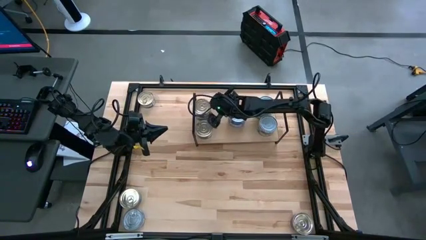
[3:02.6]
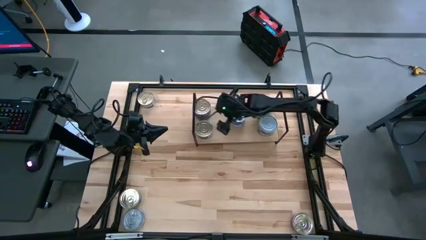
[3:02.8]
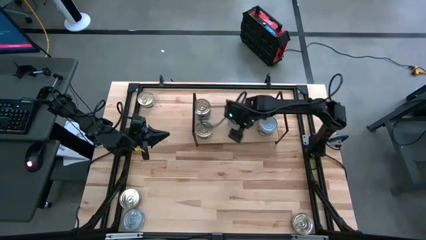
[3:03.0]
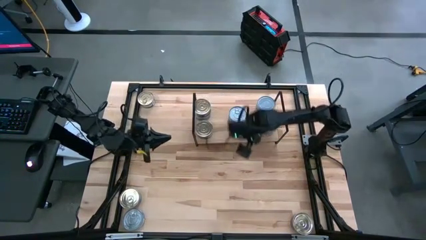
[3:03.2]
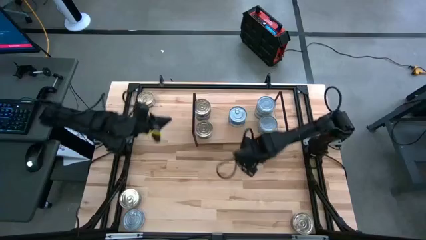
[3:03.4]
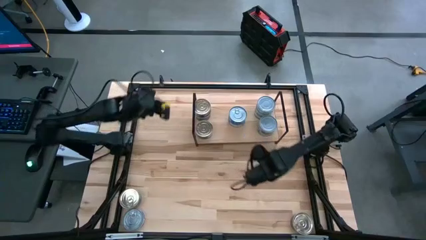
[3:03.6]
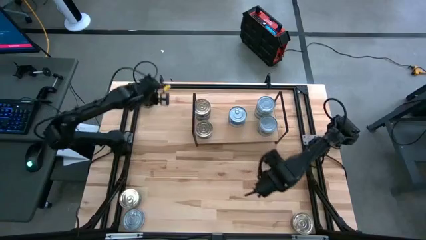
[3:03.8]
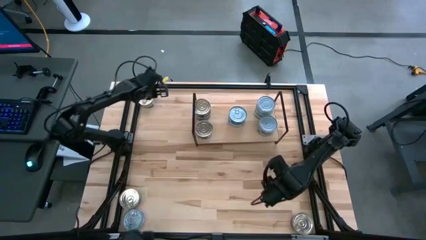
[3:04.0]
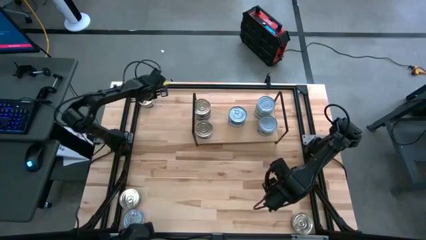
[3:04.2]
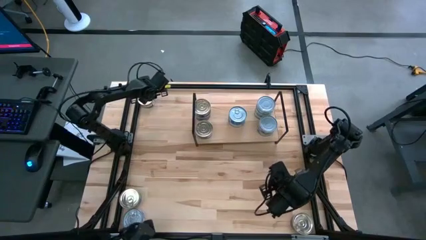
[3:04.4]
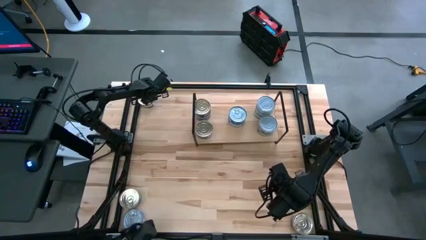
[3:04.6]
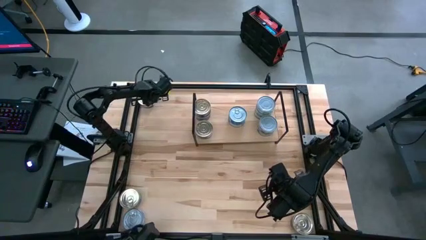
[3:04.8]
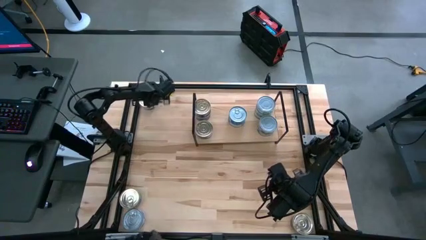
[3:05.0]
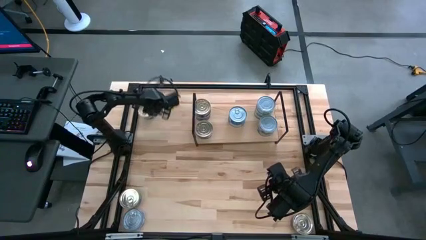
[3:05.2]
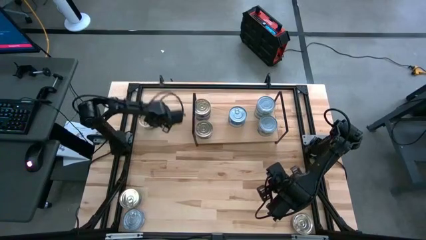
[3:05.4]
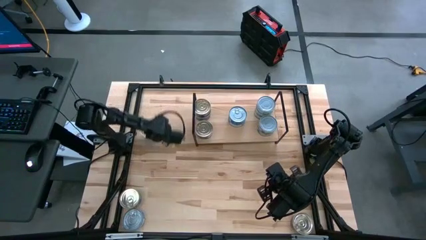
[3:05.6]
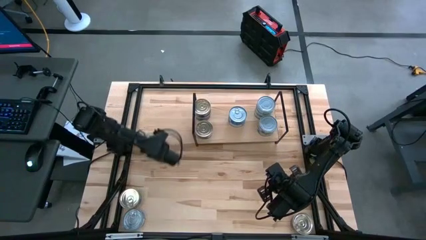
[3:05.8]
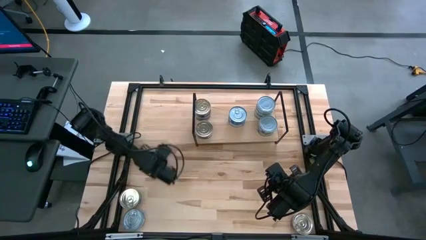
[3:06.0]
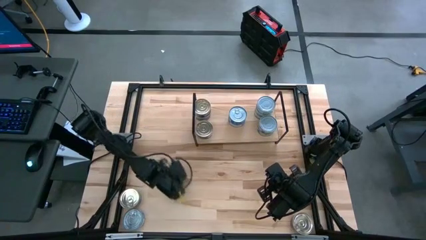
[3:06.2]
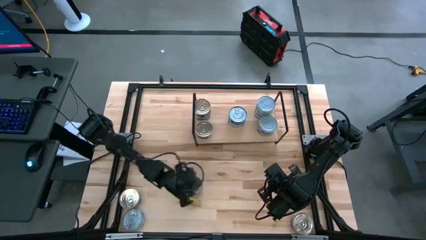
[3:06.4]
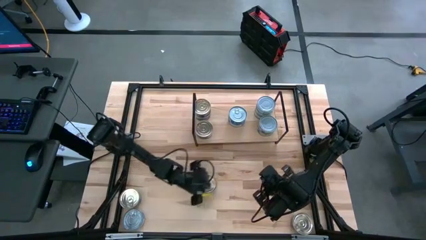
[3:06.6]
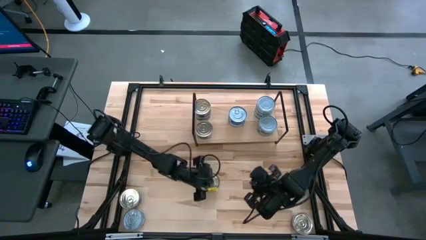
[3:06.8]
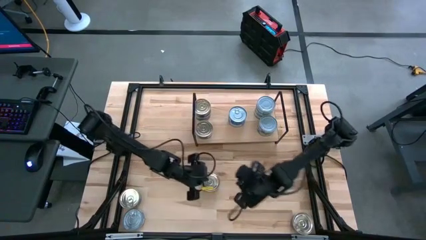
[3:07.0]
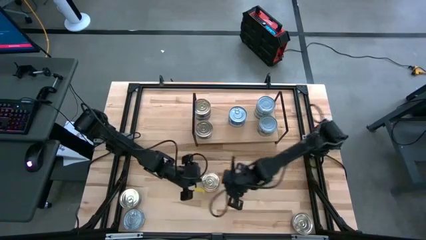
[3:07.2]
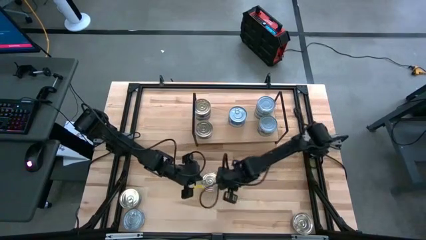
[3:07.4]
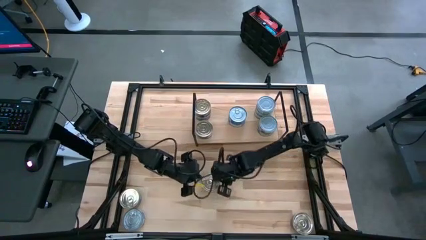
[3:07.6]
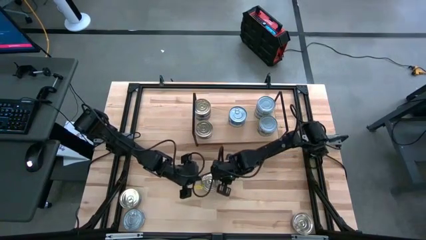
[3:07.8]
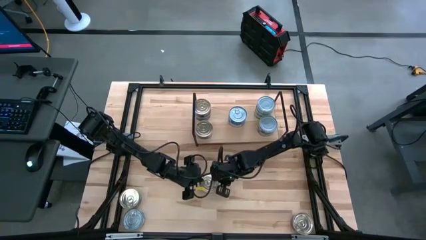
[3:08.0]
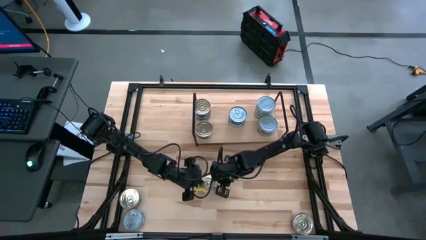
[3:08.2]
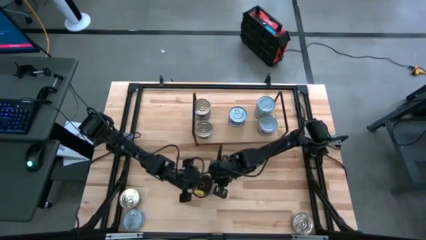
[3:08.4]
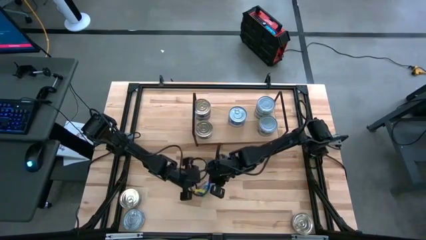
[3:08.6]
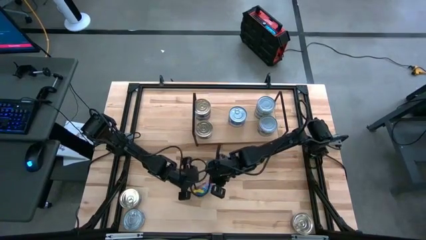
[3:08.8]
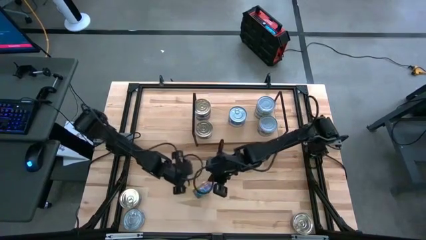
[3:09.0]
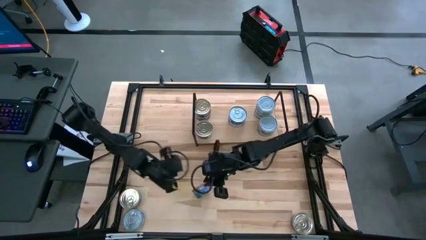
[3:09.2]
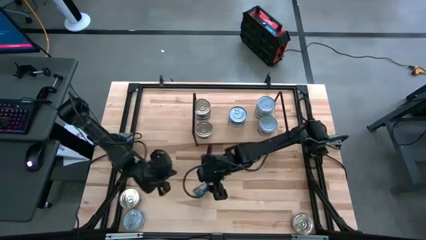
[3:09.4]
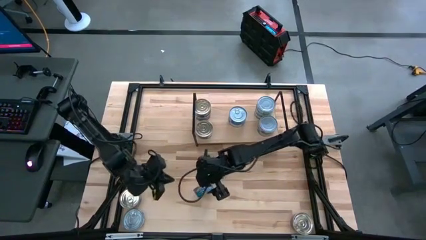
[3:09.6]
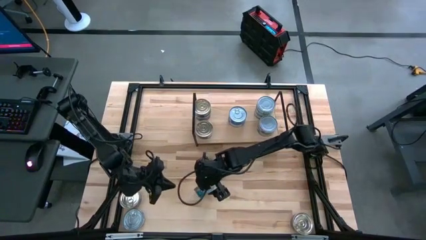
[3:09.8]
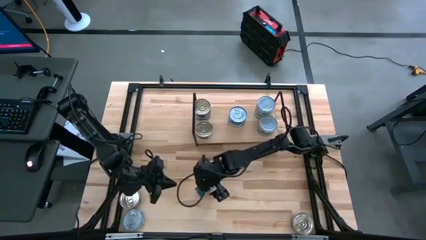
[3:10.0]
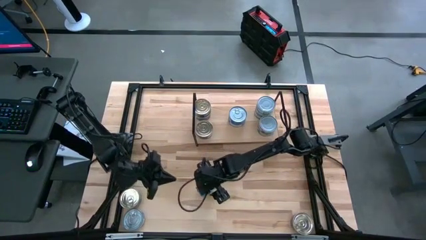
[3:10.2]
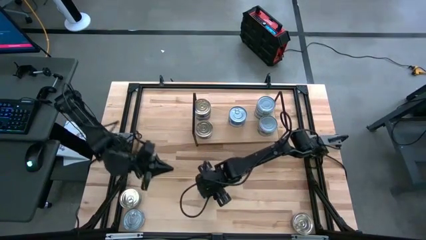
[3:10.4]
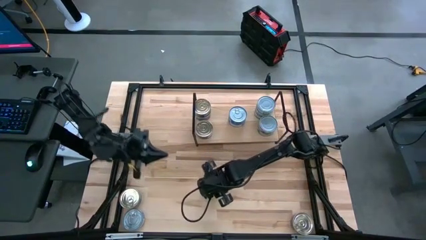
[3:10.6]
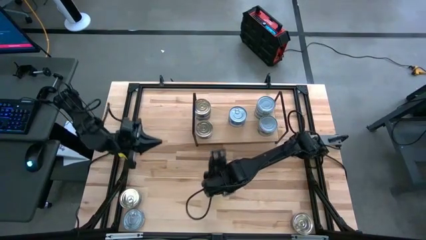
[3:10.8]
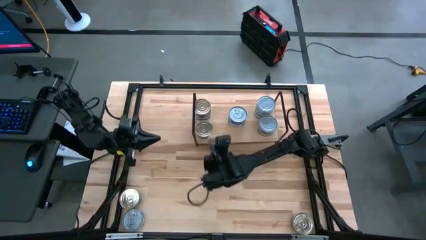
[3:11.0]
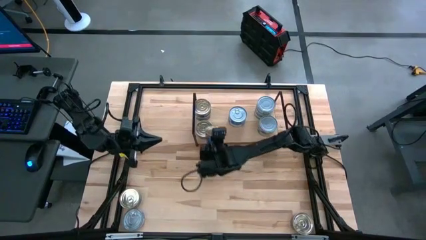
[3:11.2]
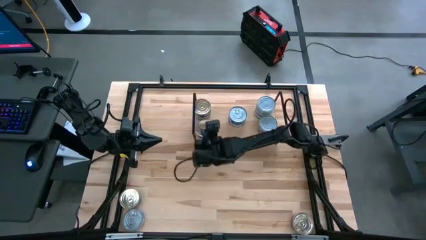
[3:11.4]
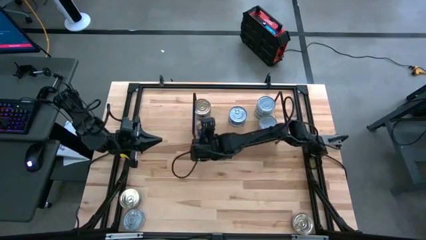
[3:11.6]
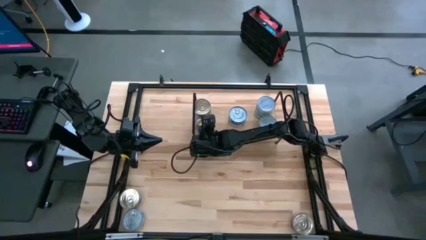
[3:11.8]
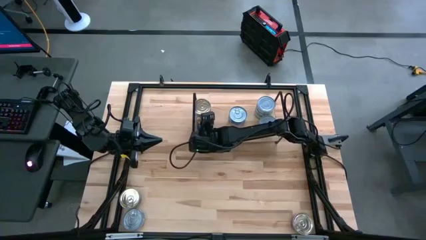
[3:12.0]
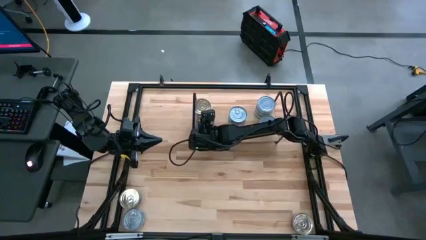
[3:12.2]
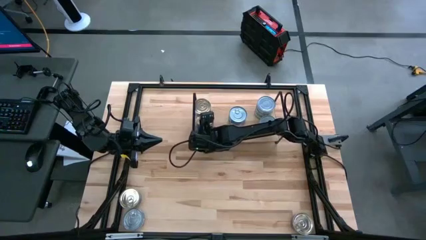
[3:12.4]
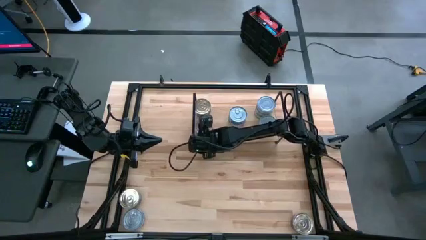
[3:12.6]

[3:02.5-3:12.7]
Task: Stack canned seafood by type on shelf
Stack the blue-pink tuna can on top of the other blue-pink tuna can on the shelf

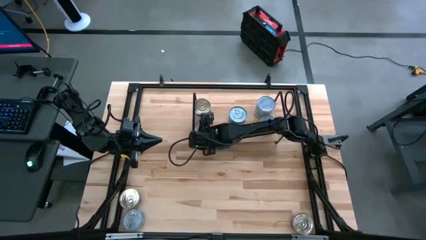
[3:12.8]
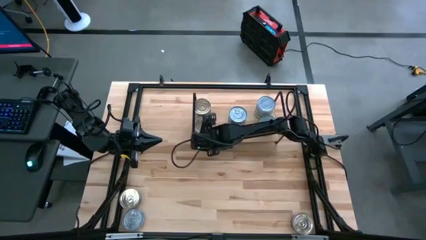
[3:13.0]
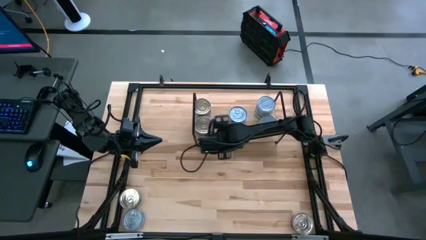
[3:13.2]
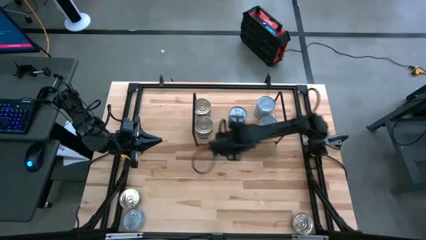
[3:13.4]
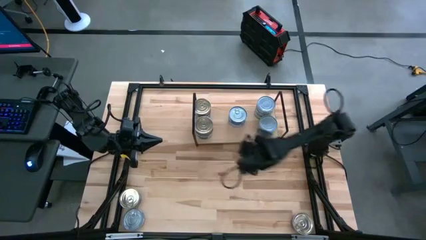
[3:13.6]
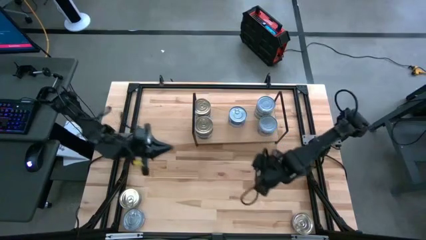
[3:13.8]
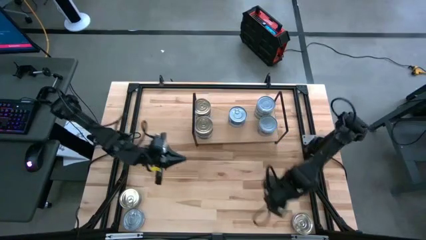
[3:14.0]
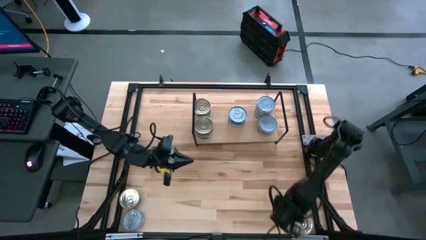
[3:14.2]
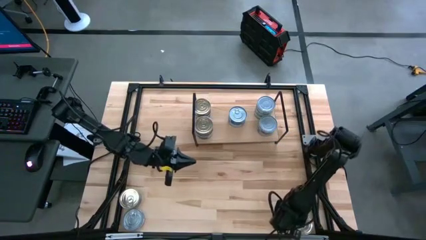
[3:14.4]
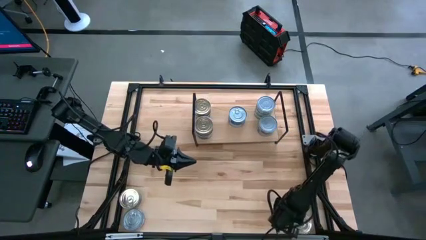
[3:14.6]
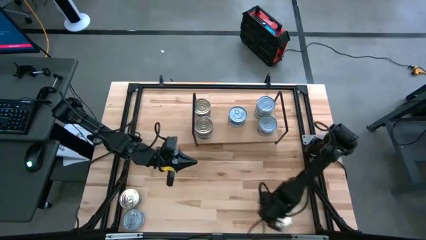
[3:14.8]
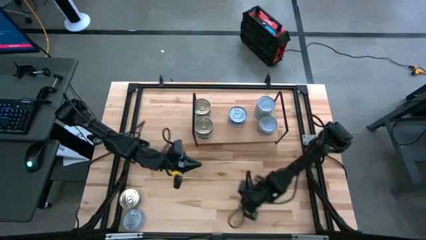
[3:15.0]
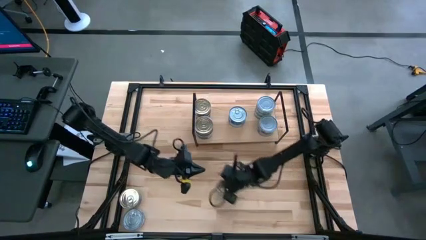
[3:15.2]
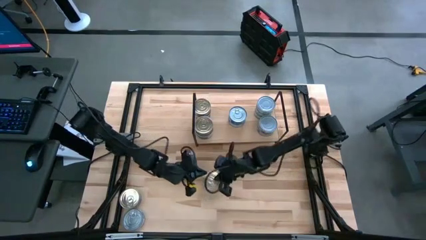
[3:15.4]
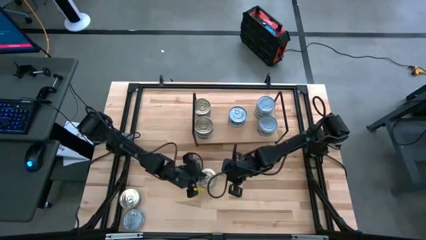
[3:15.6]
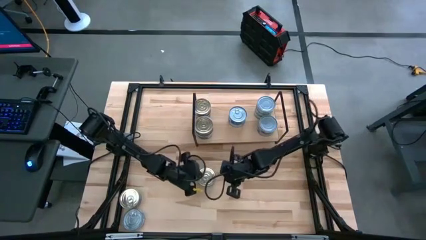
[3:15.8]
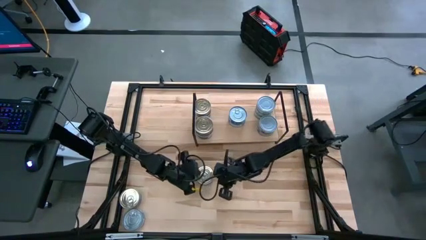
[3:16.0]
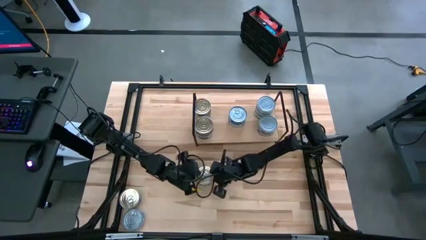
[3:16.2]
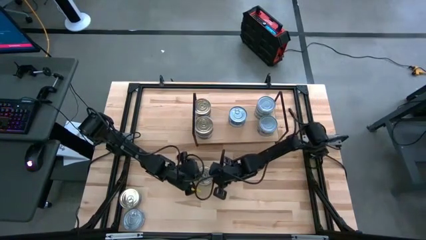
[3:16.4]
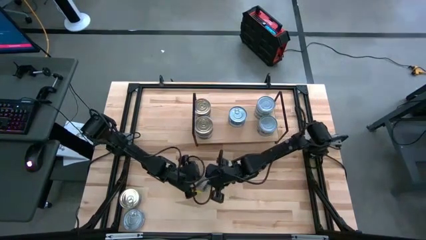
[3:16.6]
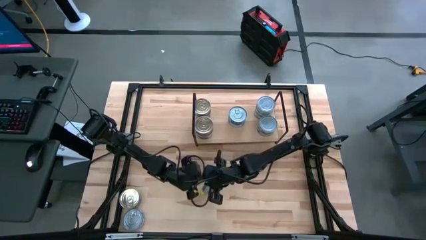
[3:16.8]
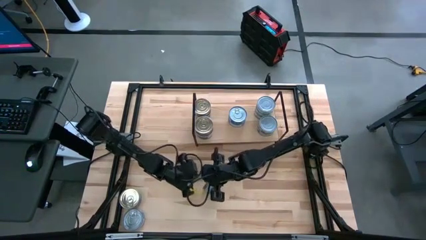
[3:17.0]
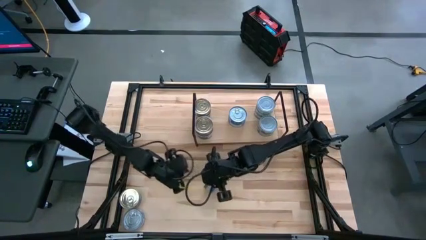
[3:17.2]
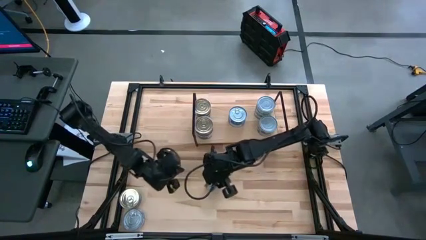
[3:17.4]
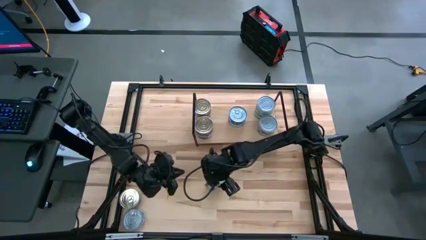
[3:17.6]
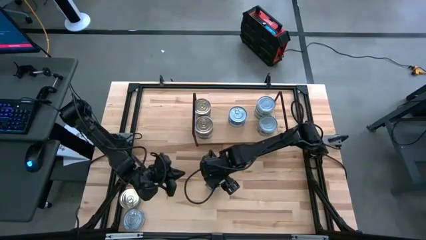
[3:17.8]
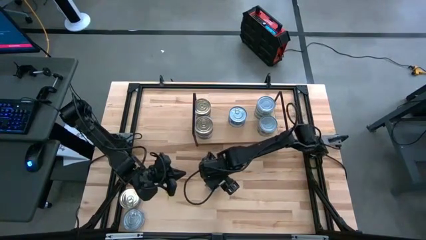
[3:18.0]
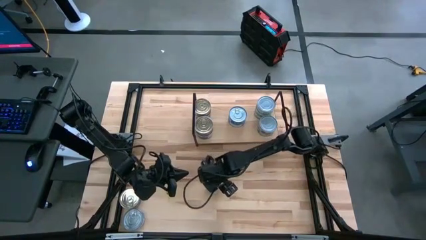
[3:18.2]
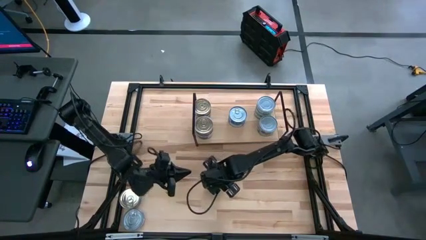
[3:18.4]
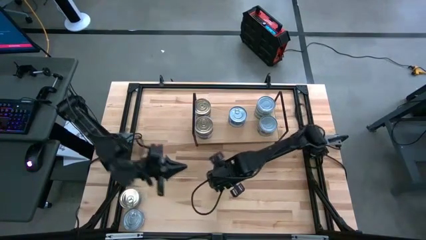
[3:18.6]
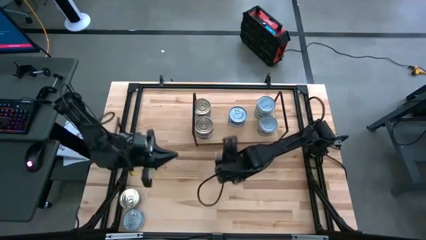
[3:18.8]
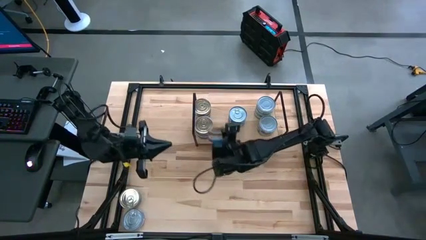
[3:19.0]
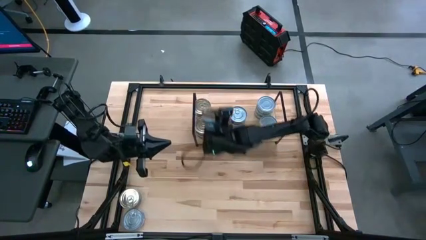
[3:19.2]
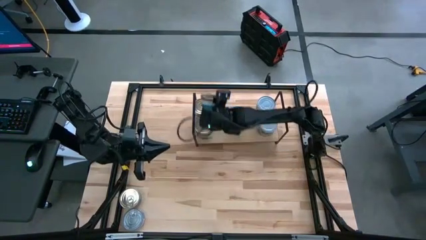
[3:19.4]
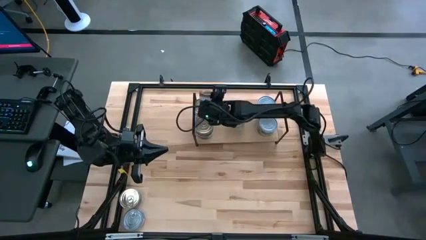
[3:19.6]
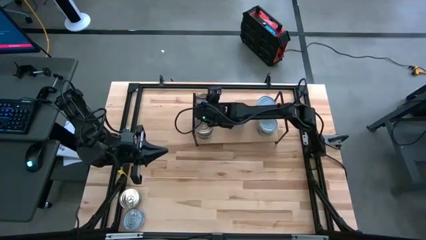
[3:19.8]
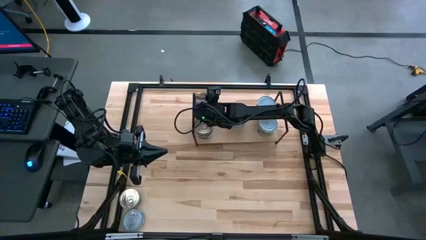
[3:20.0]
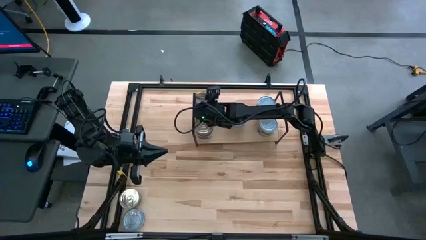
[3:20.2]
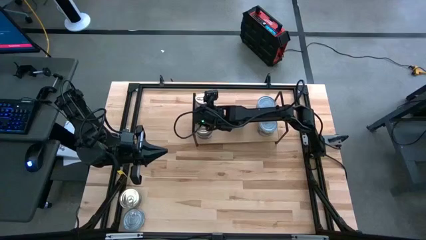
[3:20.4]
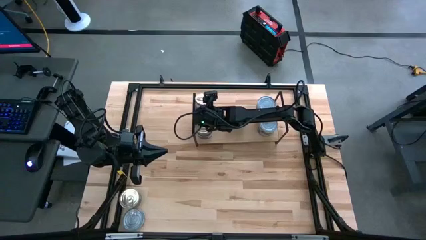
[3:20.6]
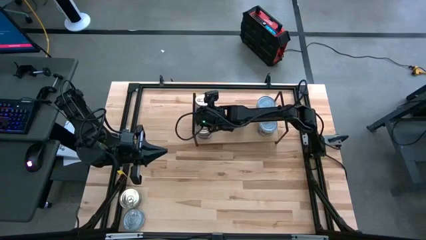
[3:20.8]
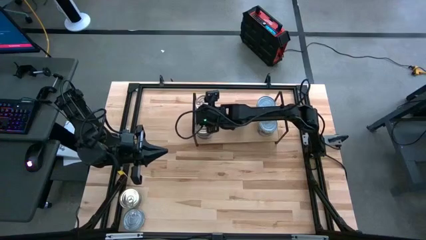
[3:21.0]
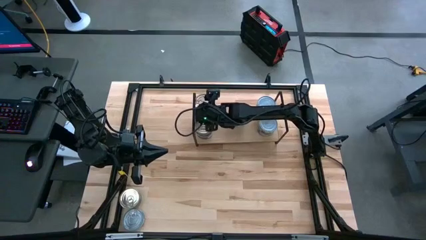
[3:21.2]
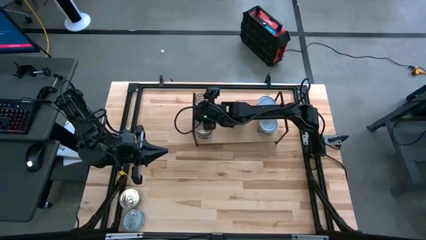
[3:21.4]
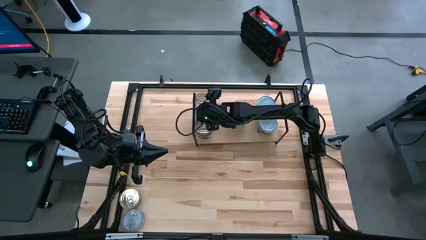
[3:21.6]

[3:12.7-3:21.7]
Stack the blue-pink tuna can on top of the other blue-pink tuna can on the shelf
